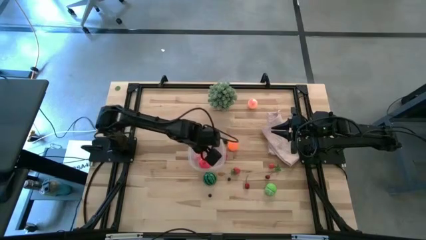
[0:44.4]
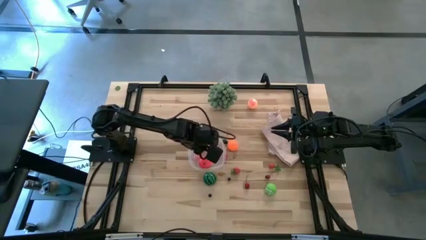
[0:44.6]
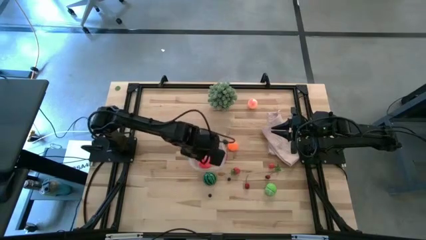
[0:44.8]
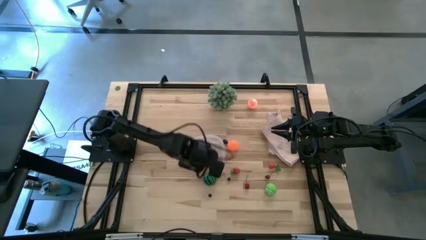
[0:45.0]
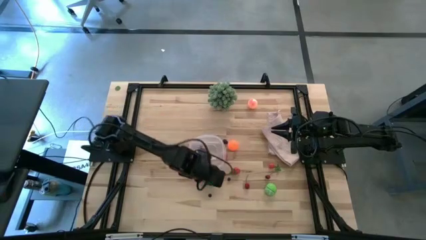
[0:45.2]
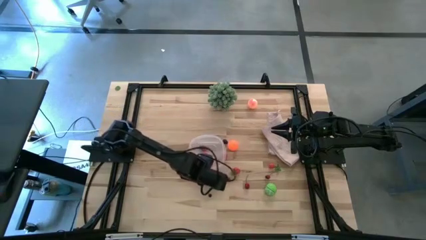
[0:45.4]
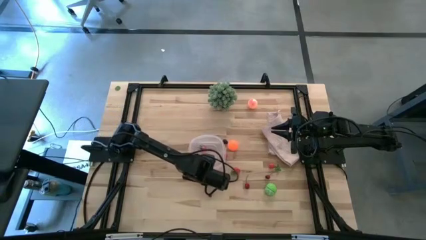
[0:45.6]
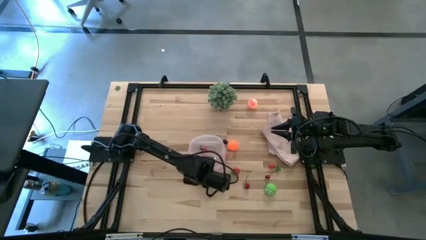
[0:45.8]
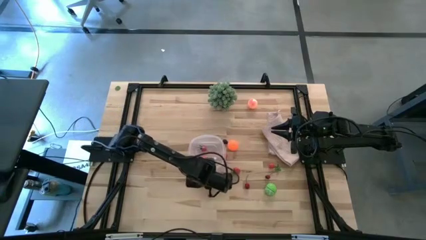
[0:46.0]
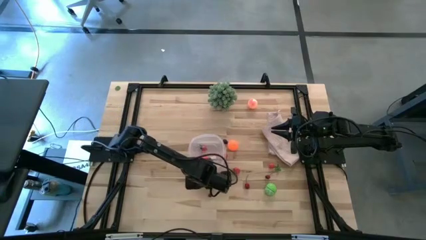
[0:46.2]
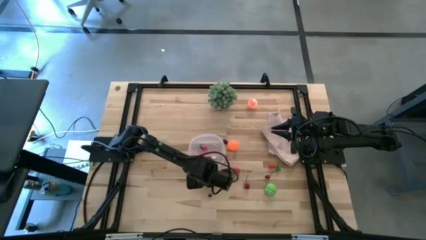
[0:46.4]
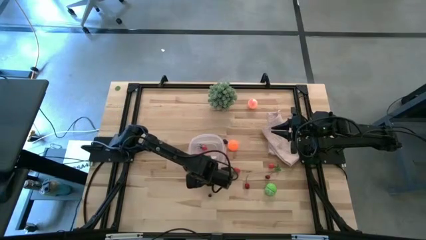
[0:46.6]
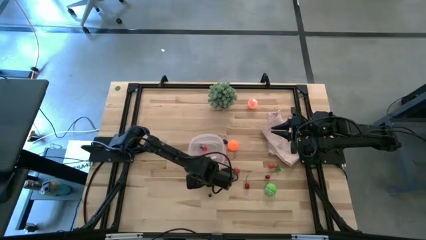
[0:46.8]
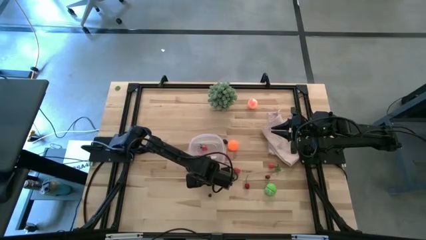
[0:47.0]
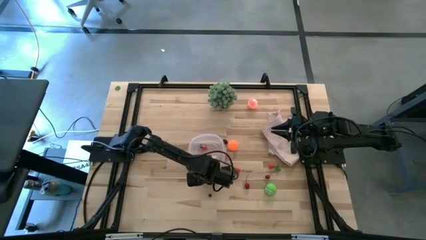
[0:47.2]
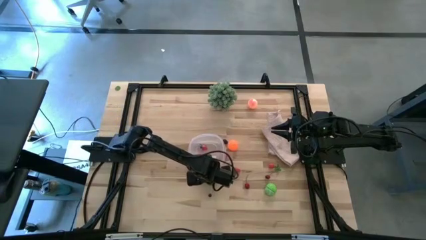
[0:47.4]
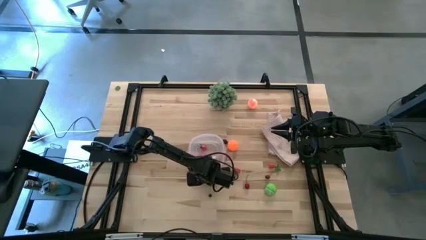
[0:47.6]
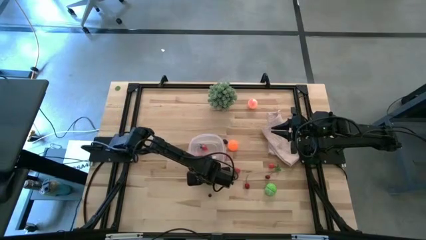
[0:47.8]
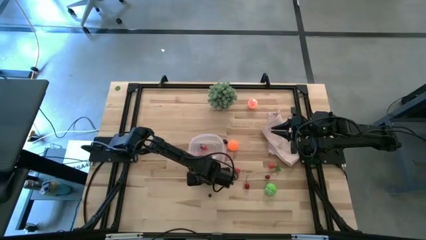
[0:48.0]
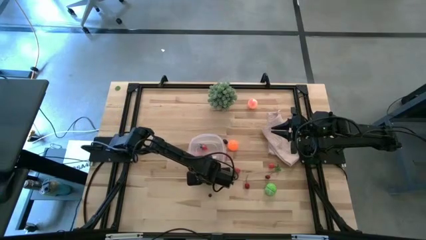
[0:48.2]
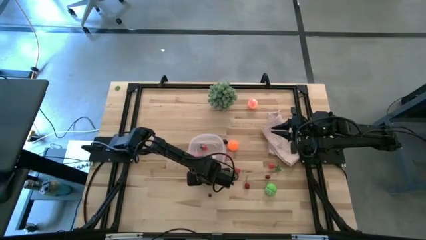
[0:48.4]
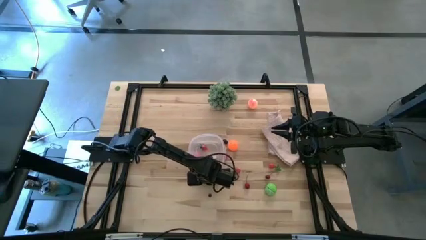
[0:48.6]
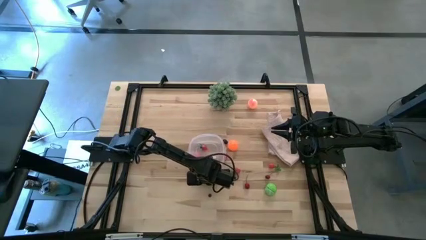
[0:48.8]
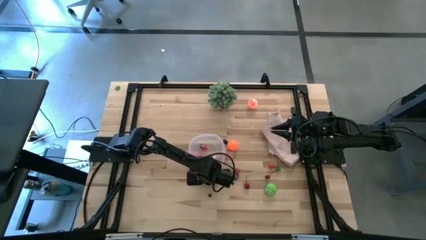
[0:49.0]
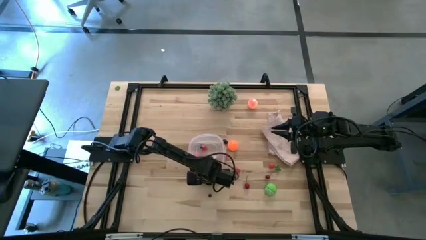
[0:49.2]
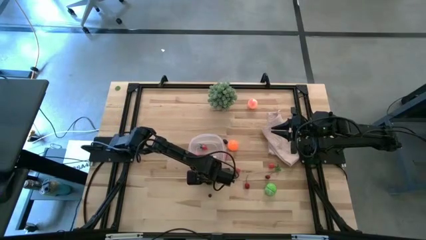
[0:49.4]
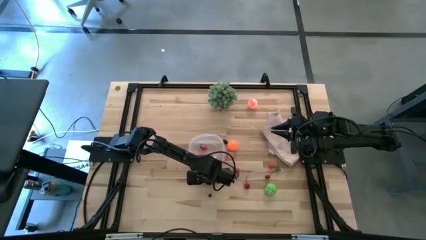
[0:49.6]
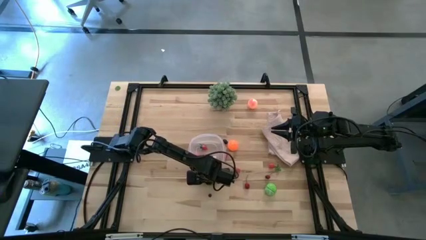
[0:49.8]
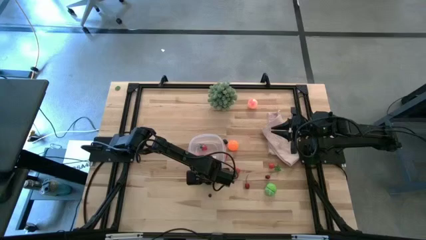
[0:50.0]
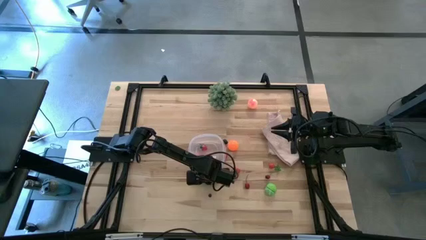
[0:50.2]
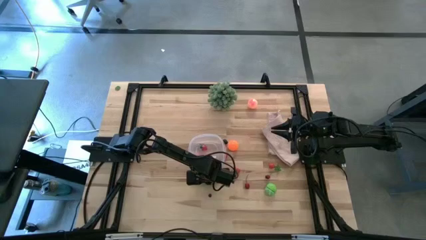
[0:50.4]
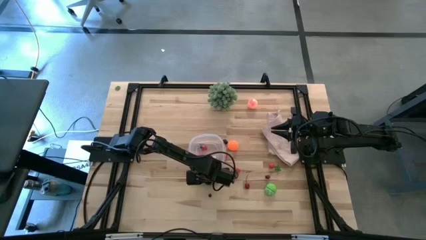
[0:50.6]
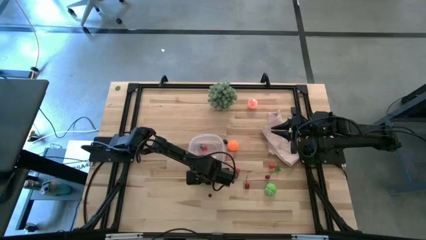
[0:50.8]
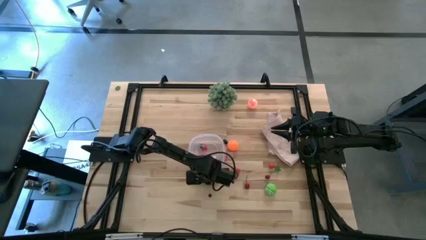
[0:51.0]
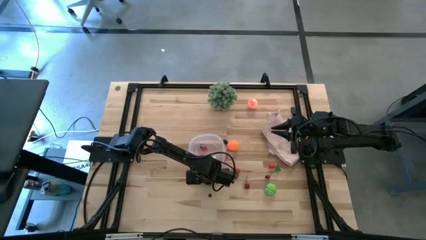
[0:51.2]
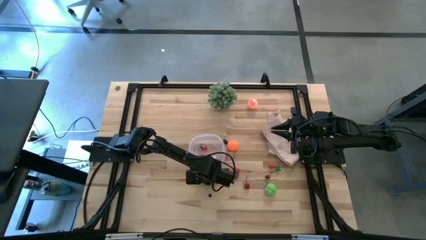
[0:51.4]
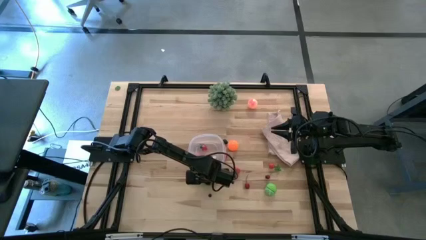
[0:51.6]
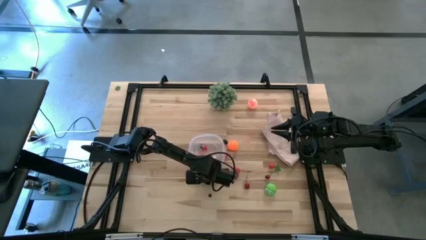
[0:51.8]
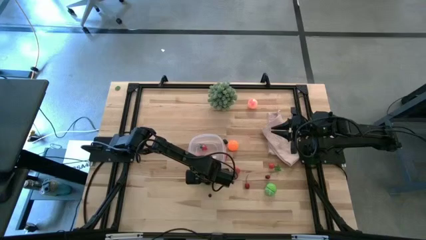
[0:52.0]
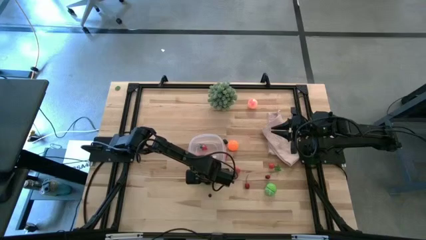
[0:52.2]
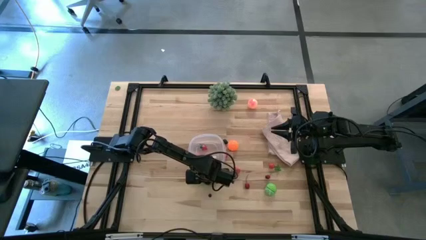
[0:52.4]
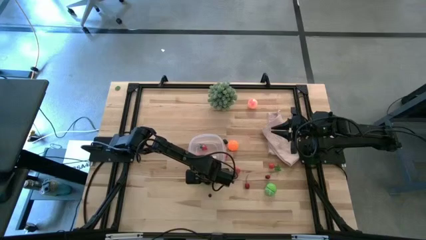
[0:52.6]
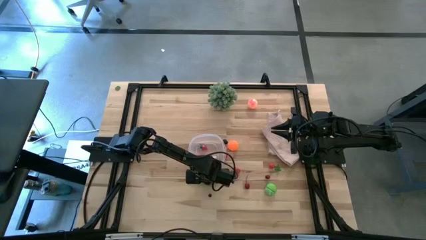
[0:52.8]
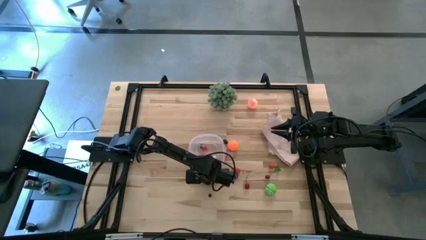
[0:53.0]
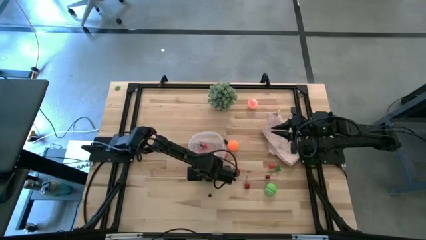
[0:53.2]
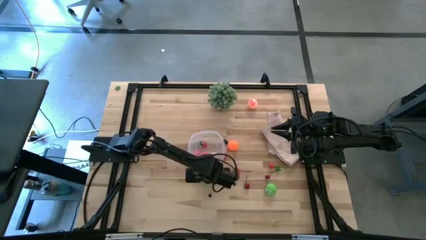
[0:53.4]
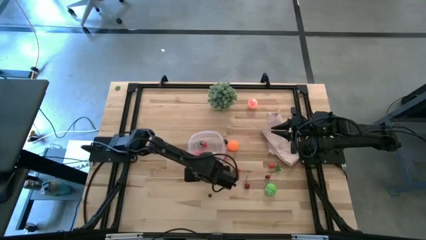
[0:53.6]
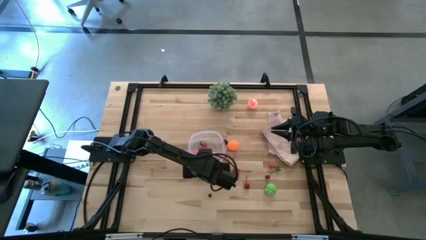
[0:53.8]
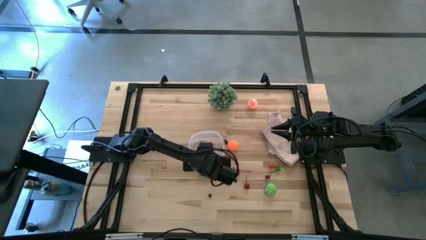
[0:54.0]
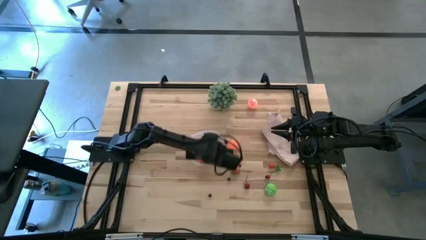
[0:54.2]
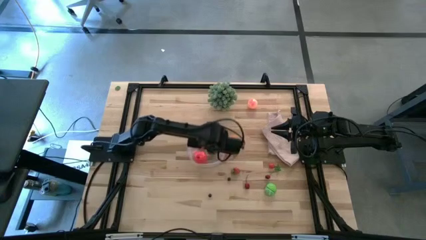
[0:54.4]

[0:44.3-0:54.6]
Task: Pick and placing Produce into tupperware
Put the green watermelon into the transparent bin
